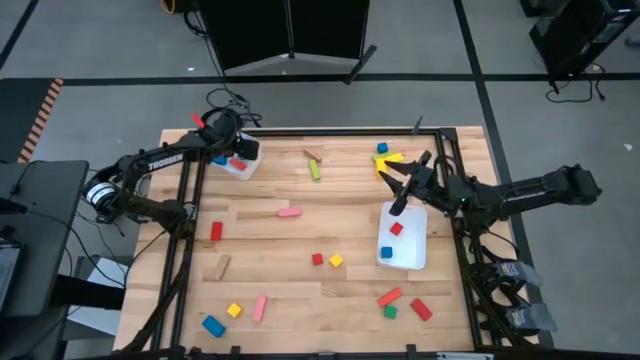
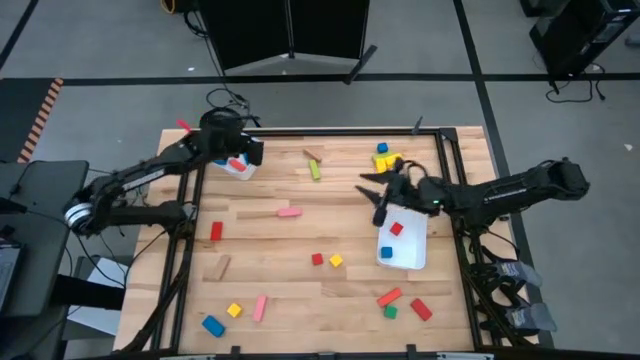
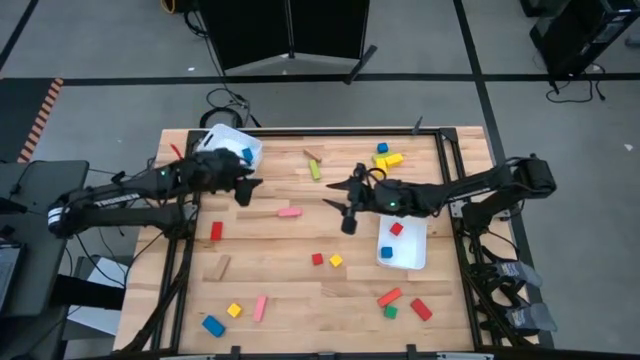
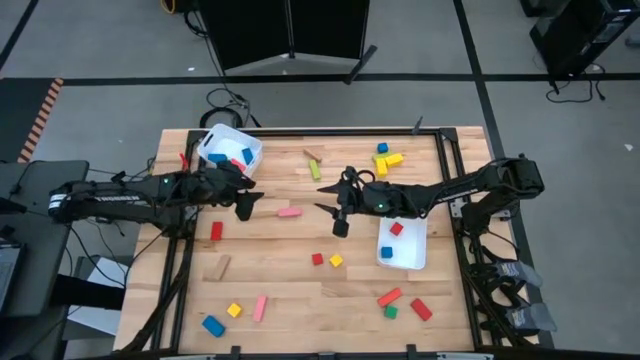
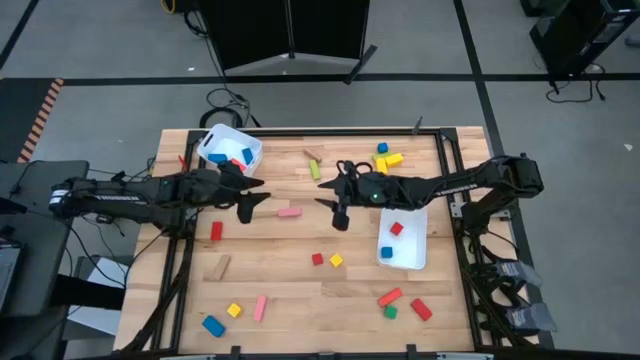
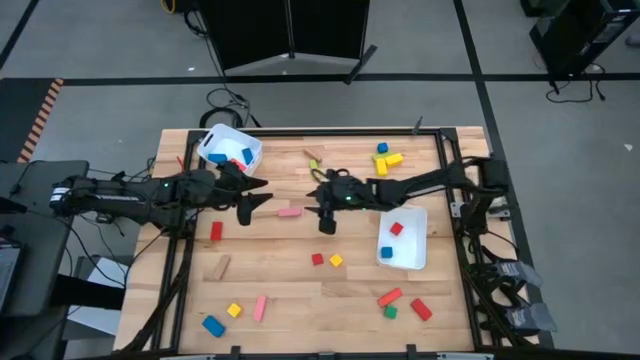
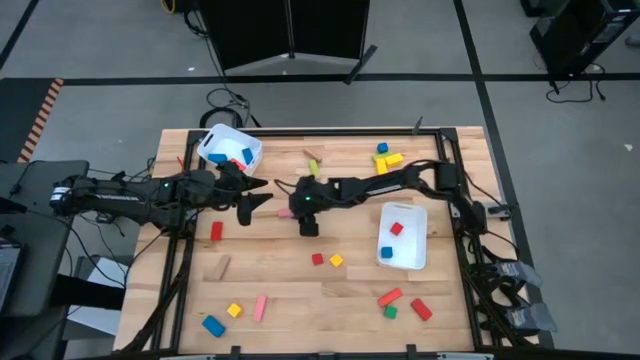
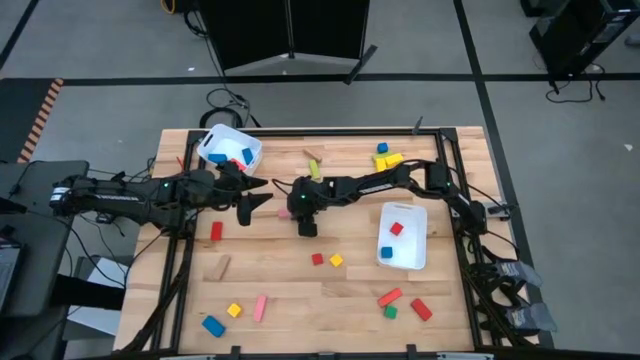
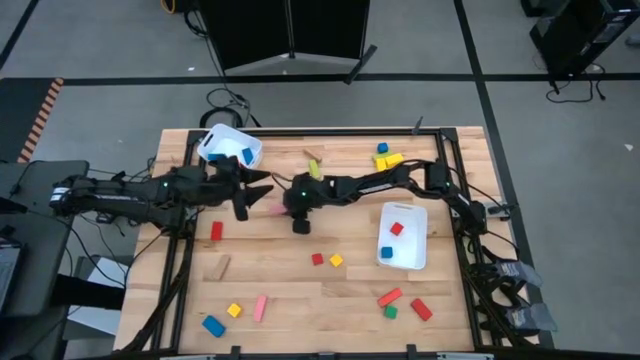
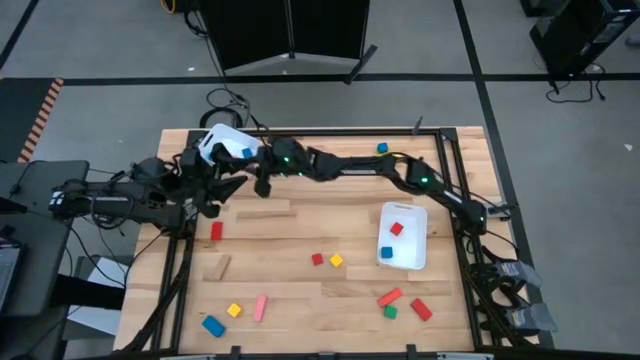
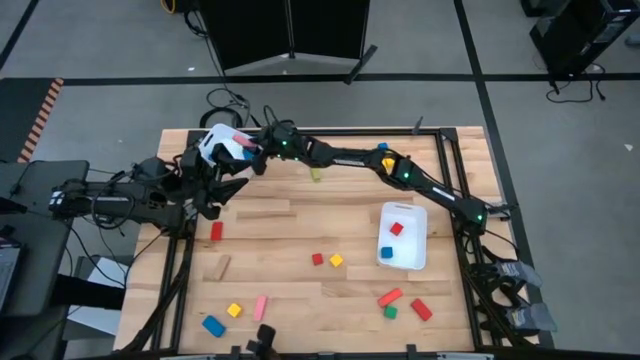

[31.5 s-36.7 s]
Task: Sort blocks by size
Put the top pink rectangular block into the top white bin

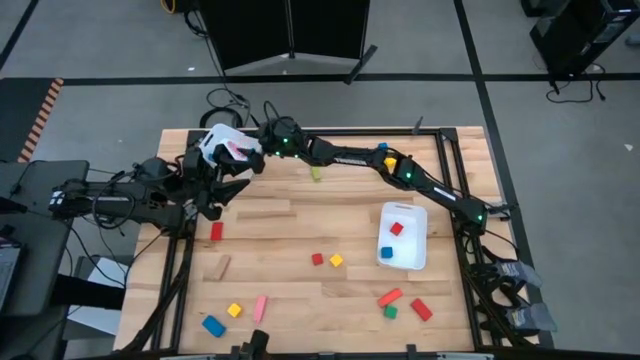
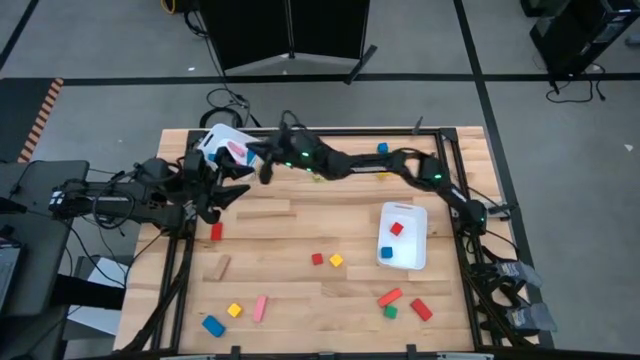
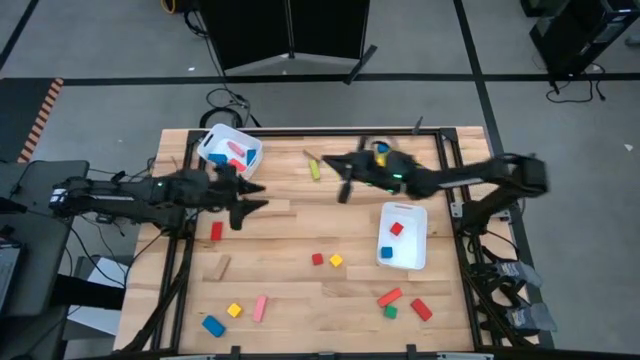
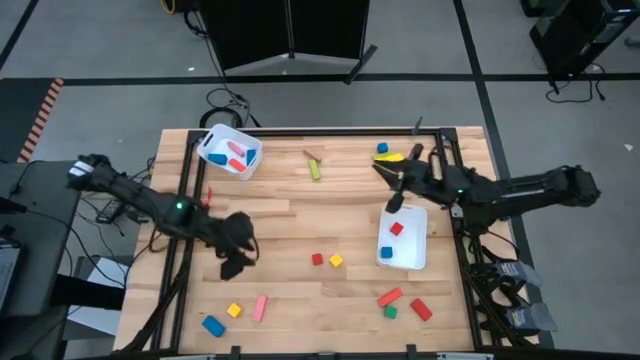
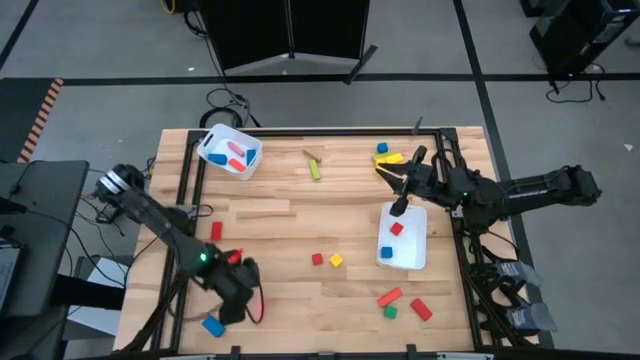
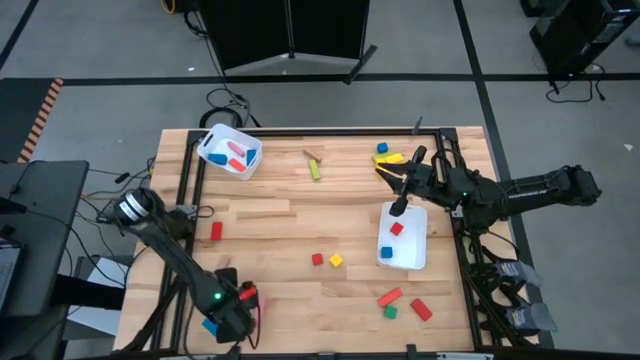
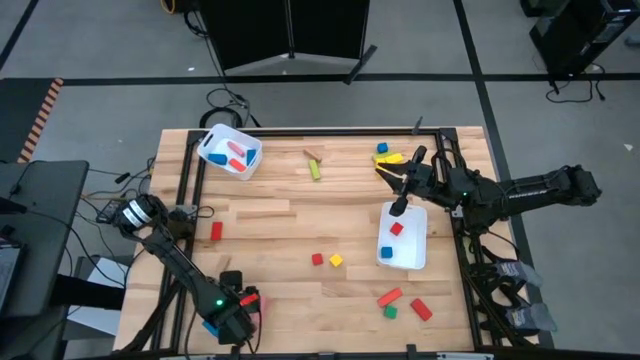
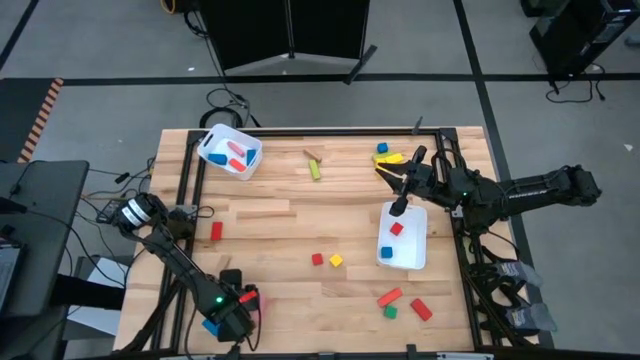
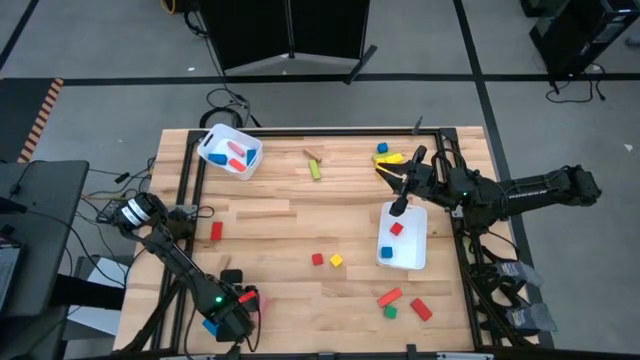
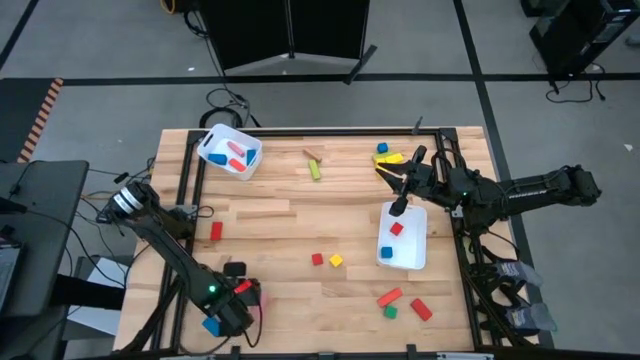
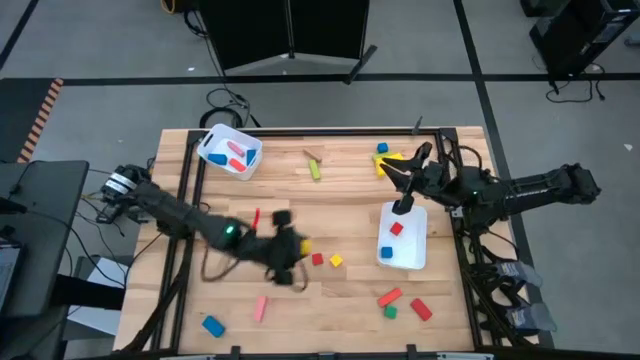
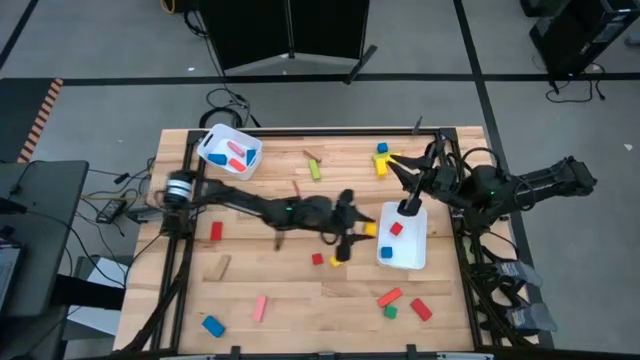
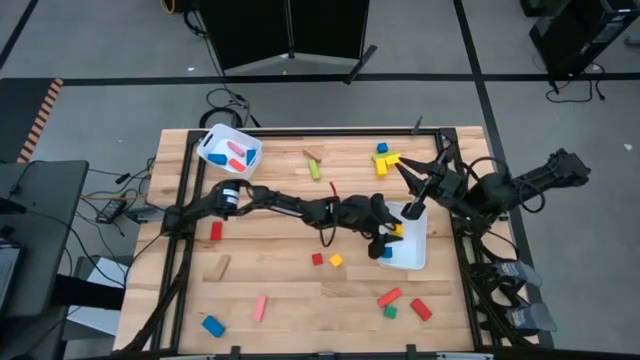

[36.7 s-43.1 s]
Put the bottom yellow cube block into the bottom white bin

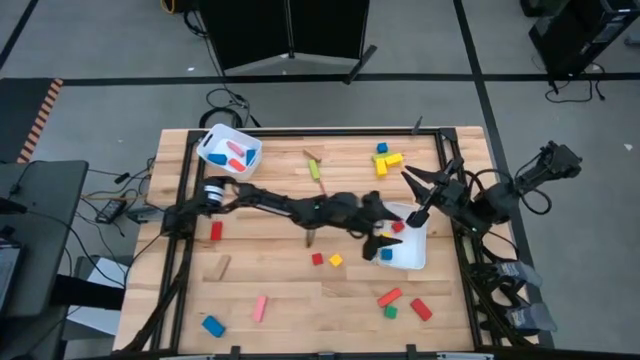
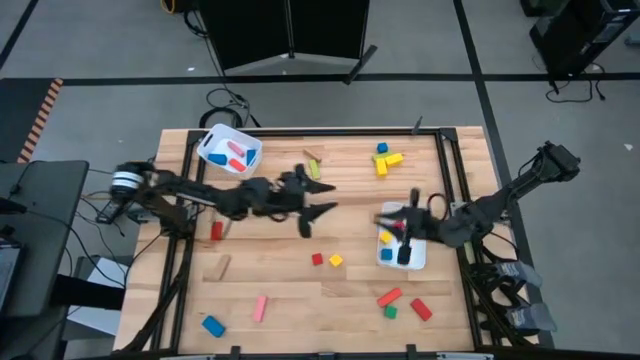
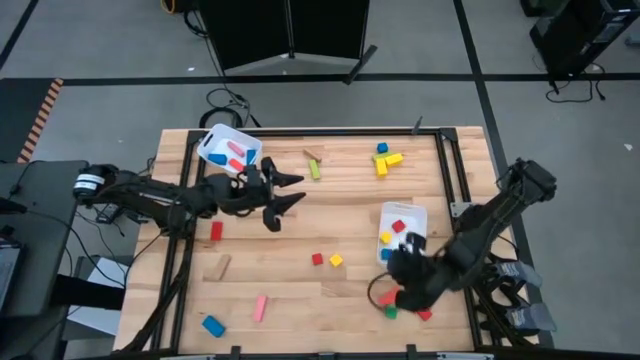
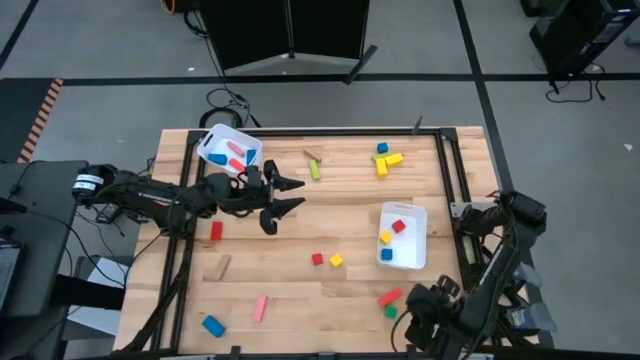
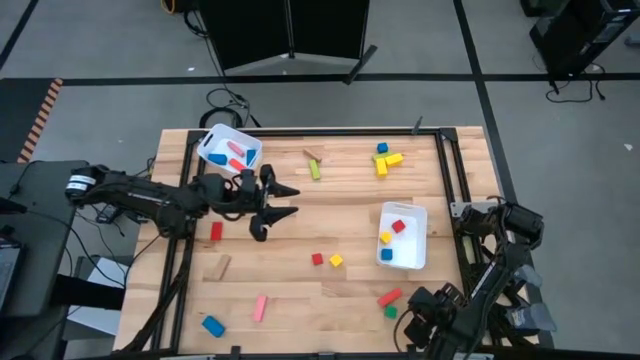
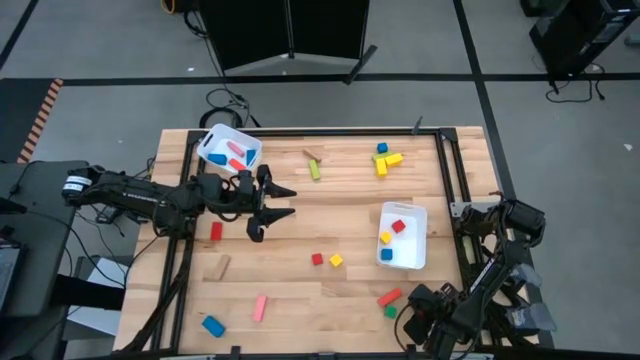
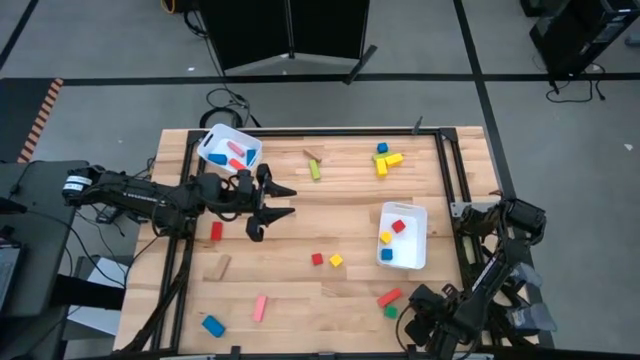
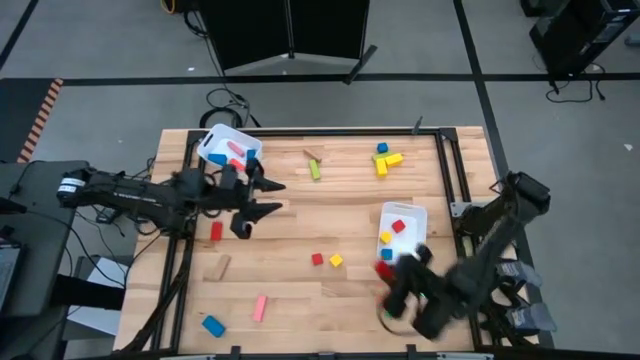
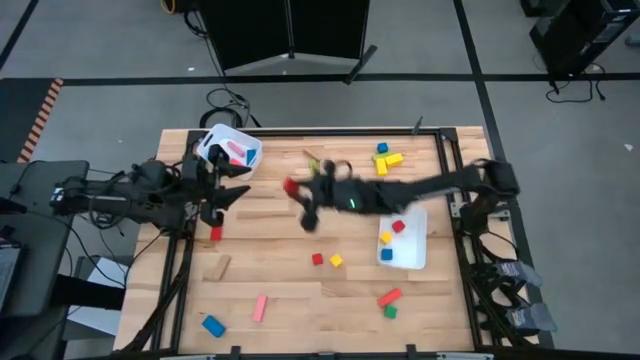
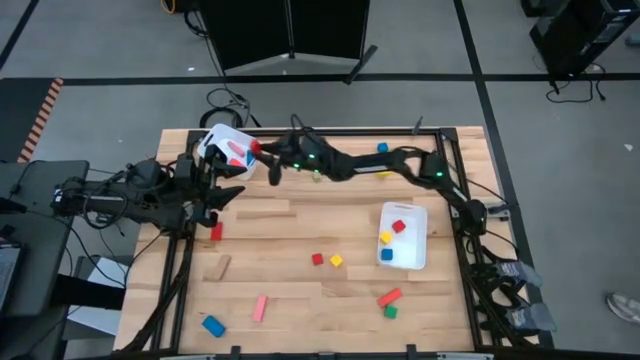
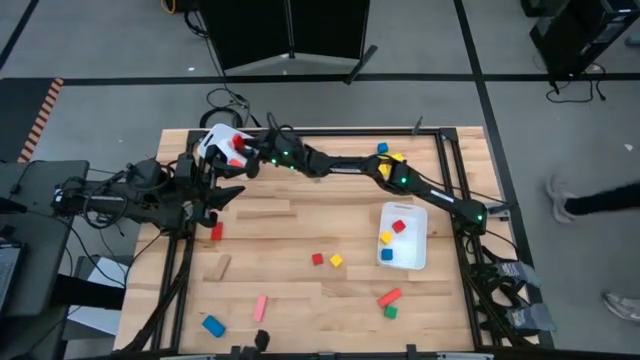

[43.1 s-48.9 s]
Put the bottom red rectangular block into the top white bin

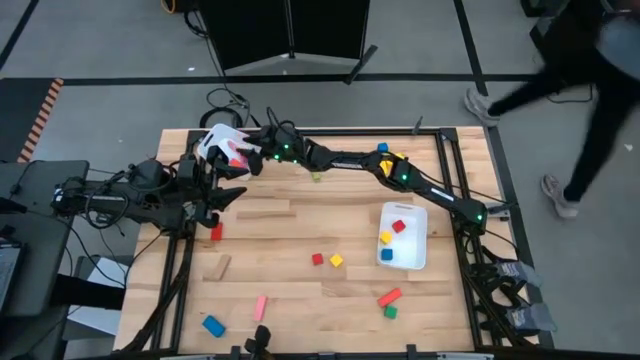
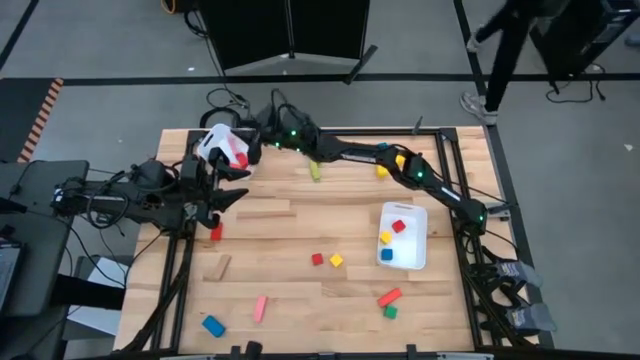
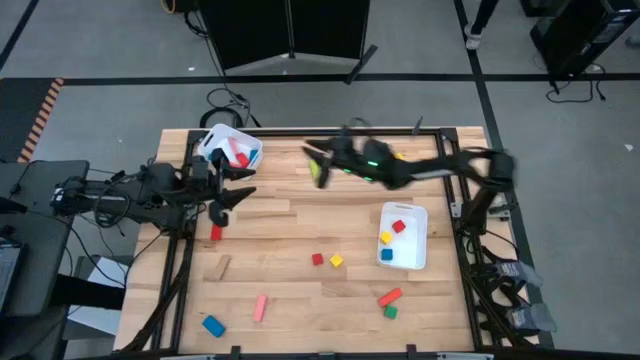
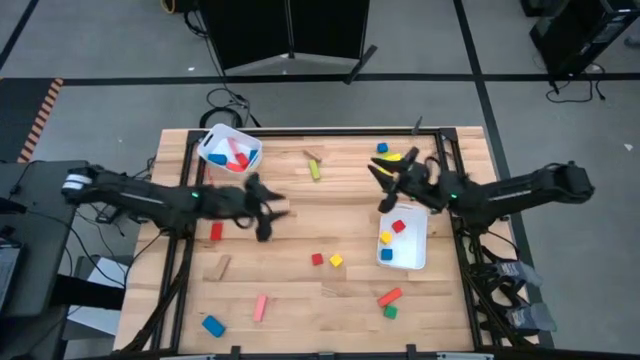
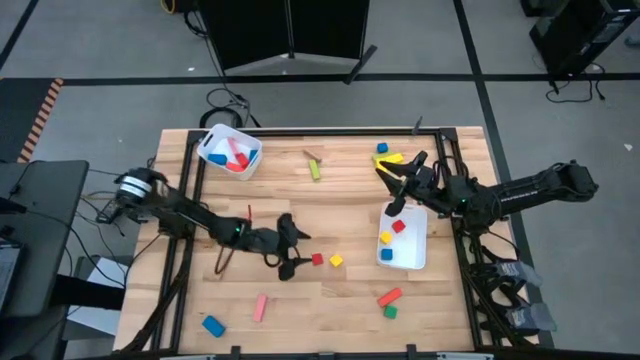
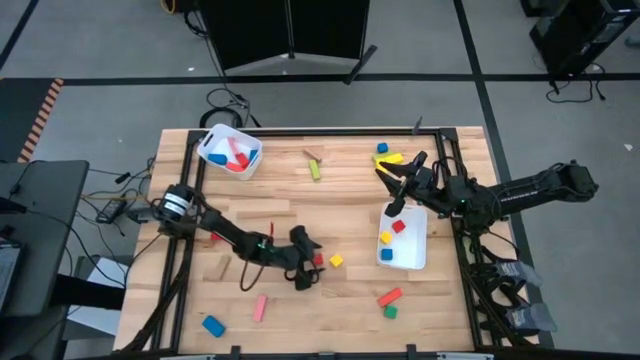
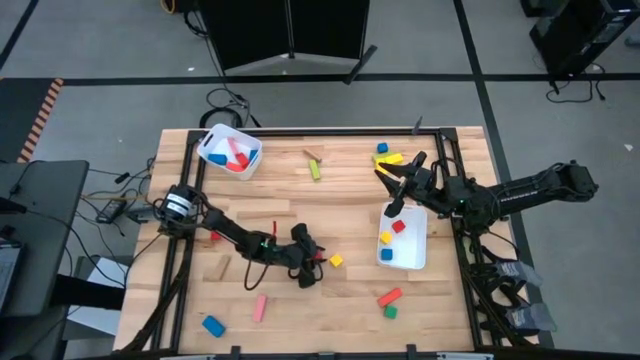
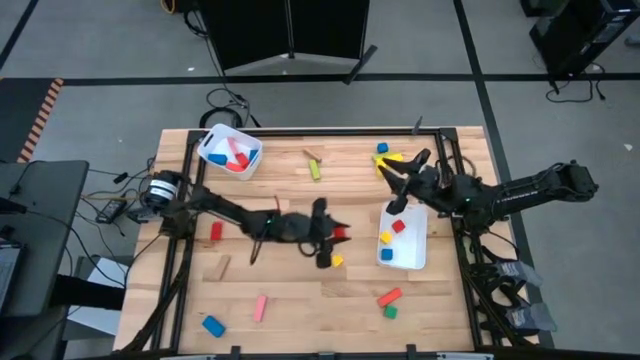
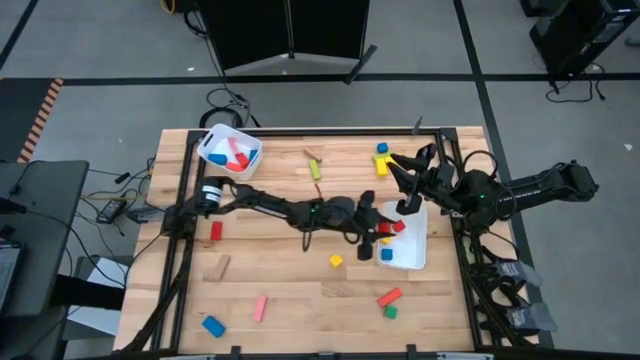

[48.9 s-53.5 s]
Put the red cube block into the bottom white bin
